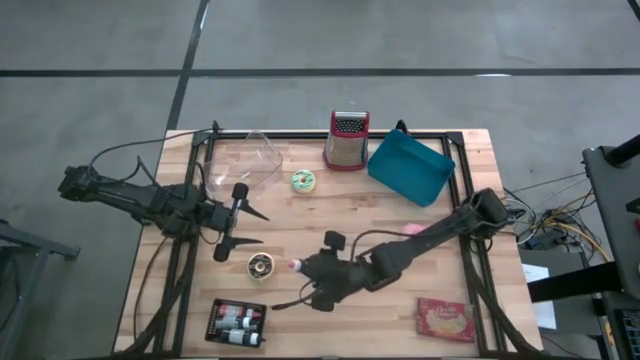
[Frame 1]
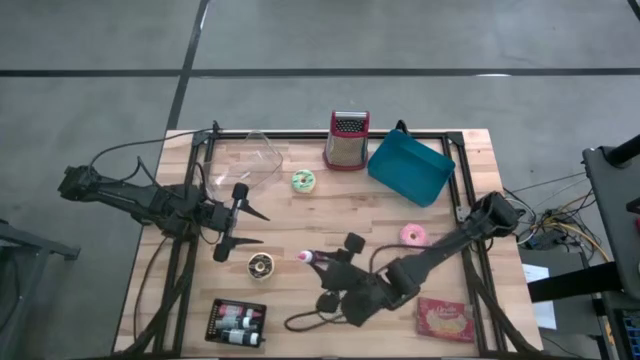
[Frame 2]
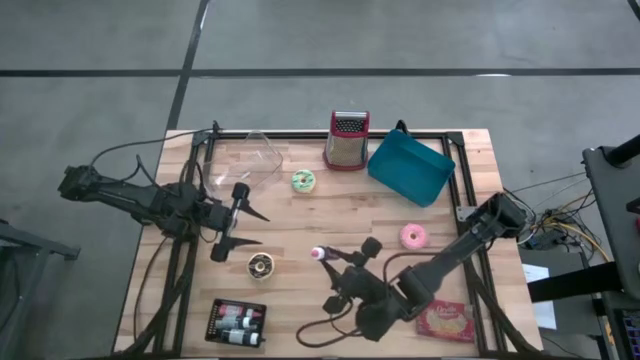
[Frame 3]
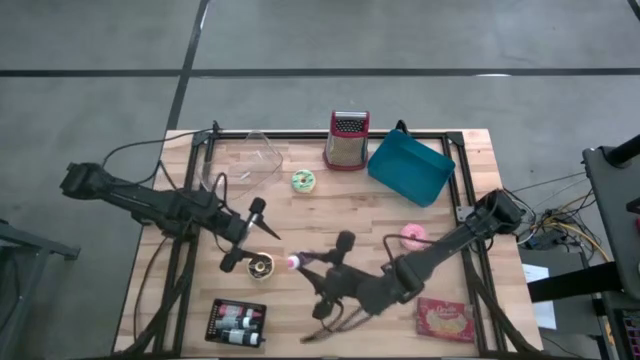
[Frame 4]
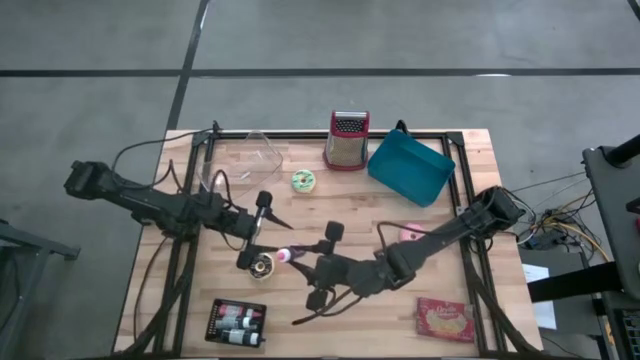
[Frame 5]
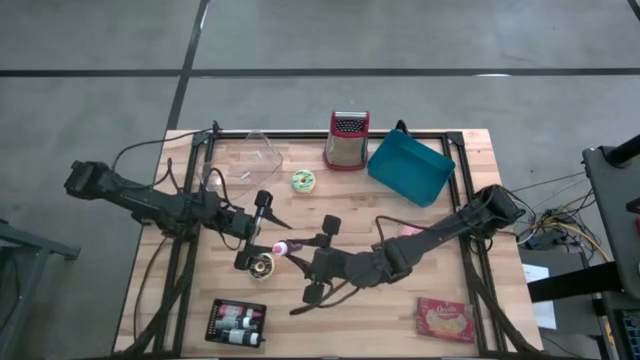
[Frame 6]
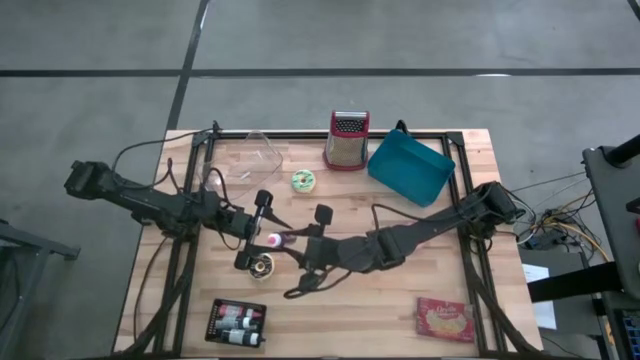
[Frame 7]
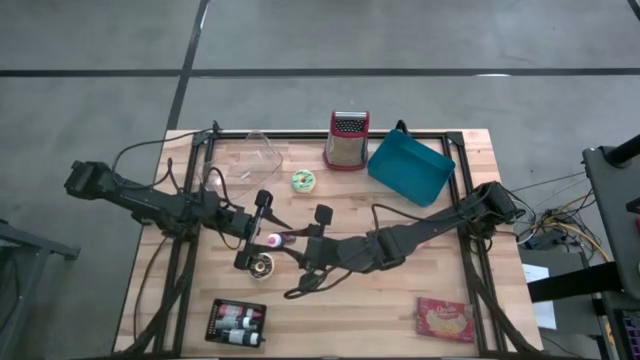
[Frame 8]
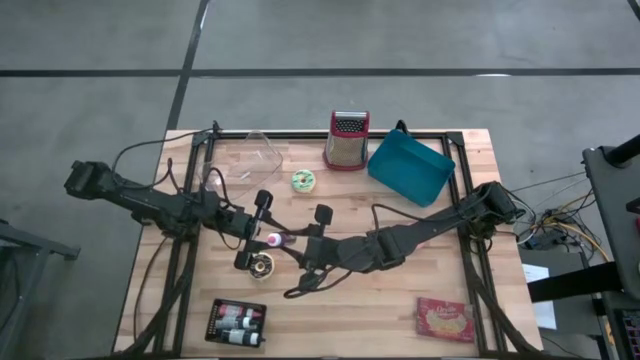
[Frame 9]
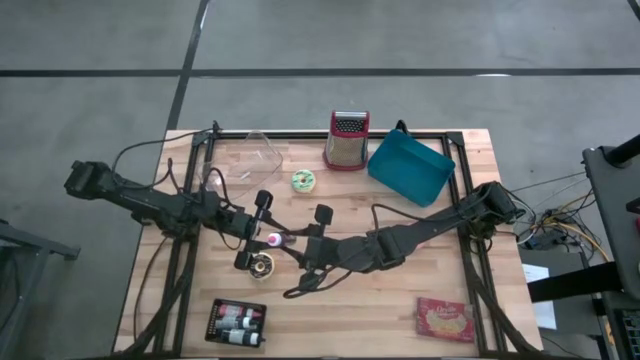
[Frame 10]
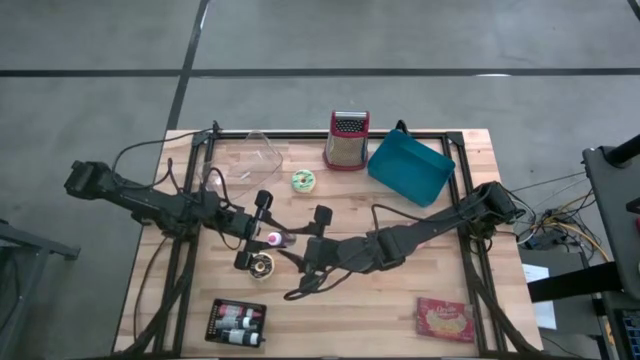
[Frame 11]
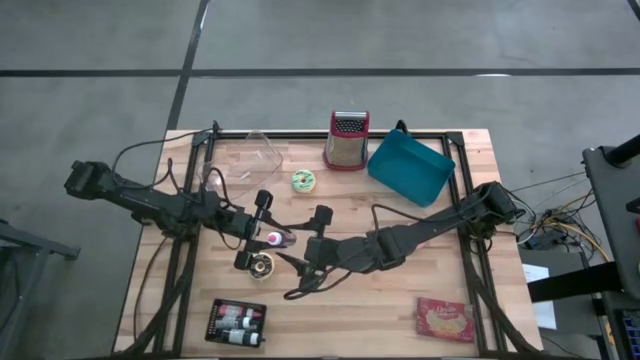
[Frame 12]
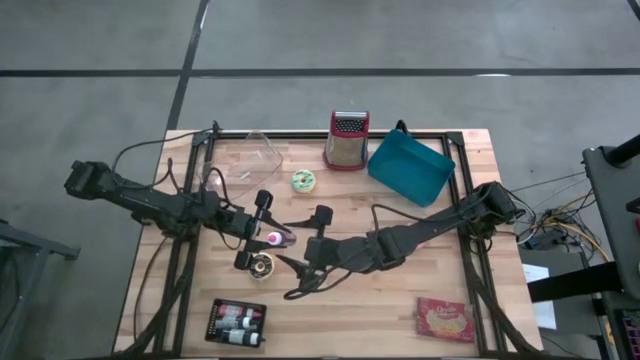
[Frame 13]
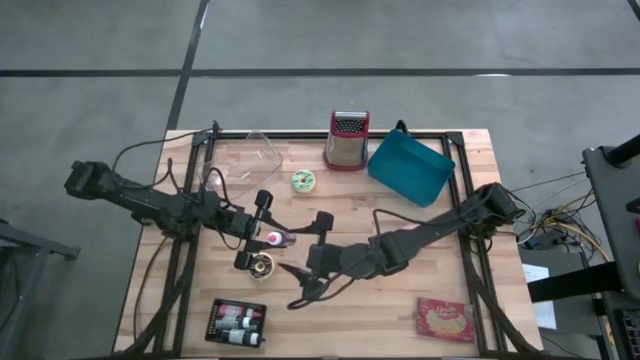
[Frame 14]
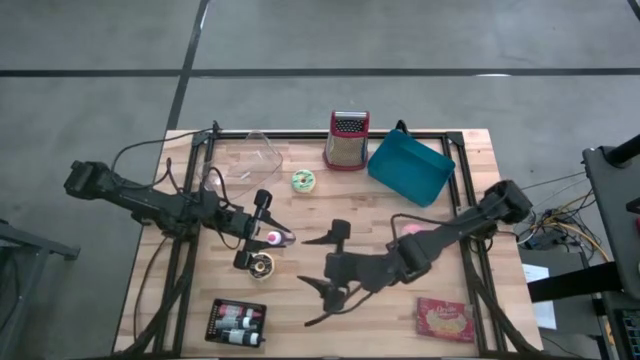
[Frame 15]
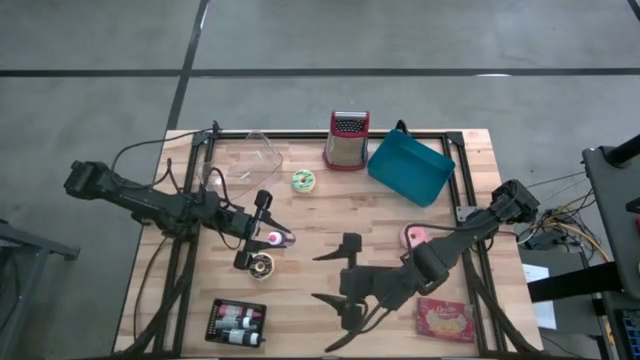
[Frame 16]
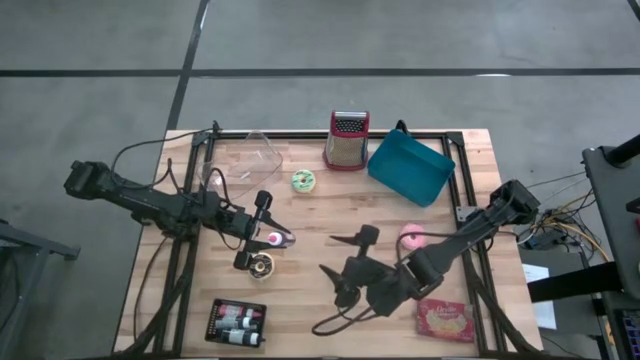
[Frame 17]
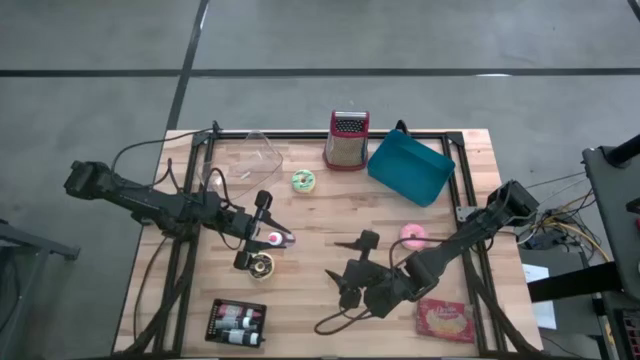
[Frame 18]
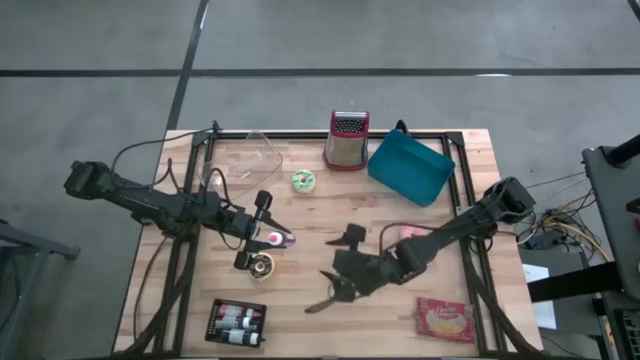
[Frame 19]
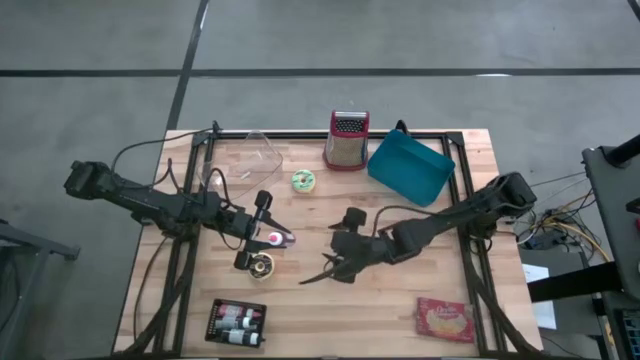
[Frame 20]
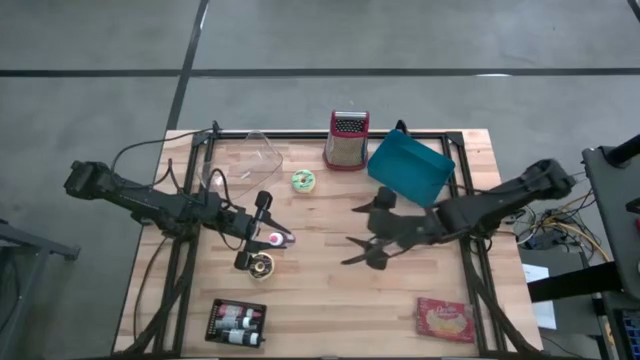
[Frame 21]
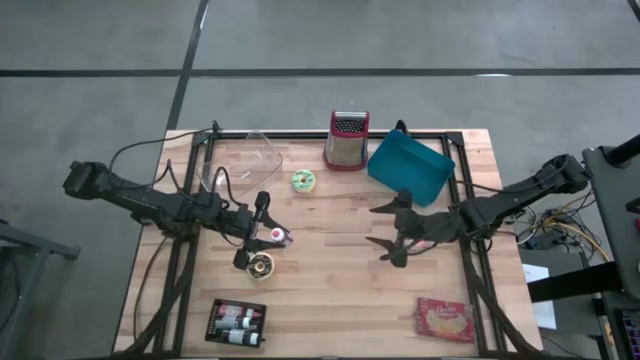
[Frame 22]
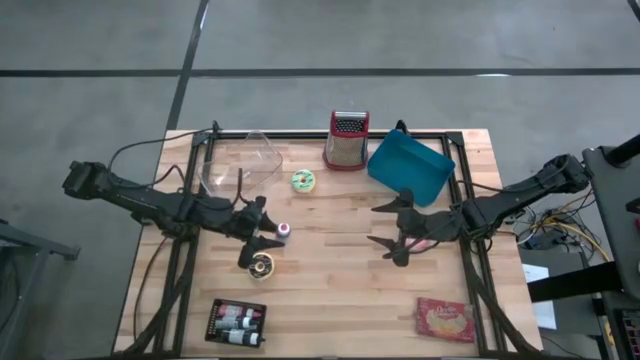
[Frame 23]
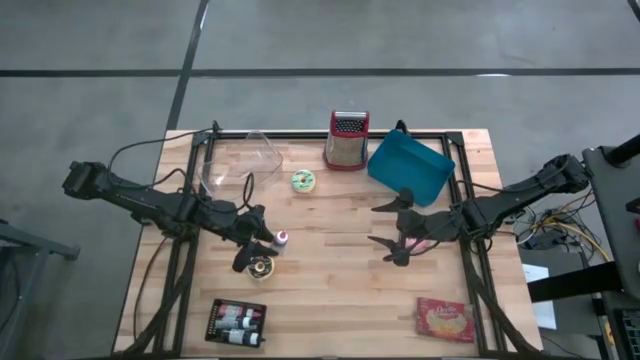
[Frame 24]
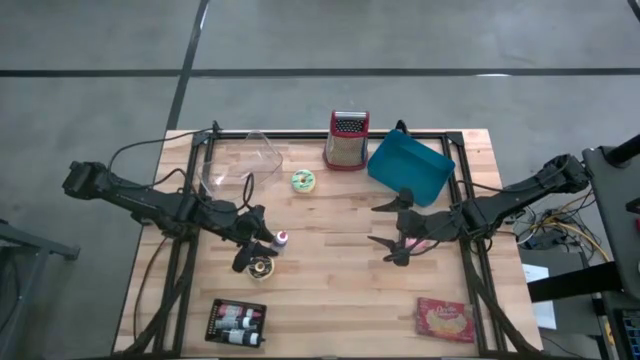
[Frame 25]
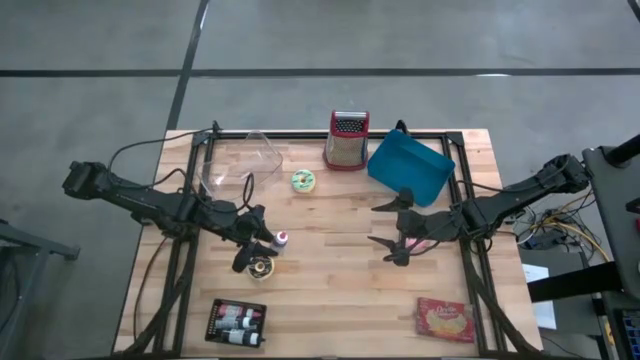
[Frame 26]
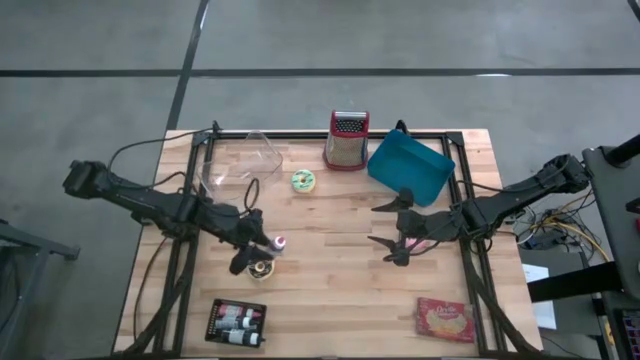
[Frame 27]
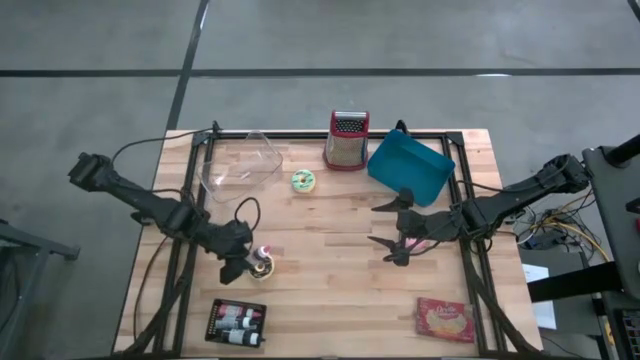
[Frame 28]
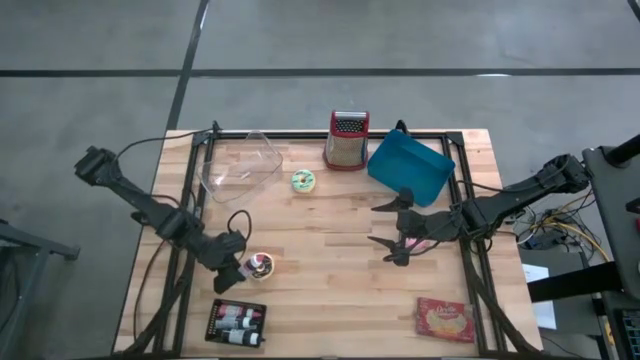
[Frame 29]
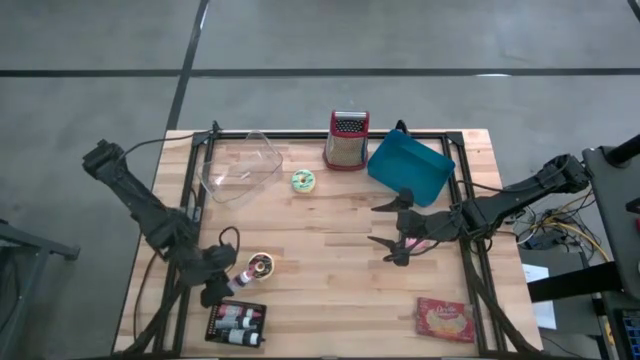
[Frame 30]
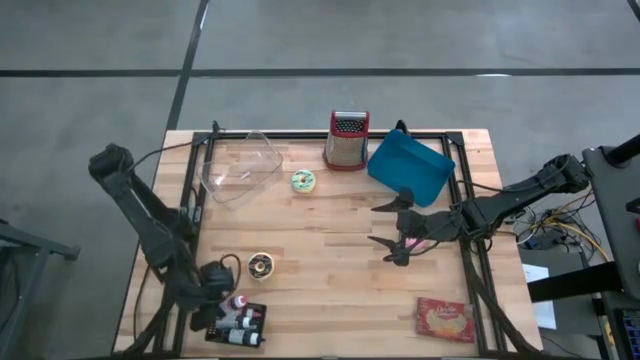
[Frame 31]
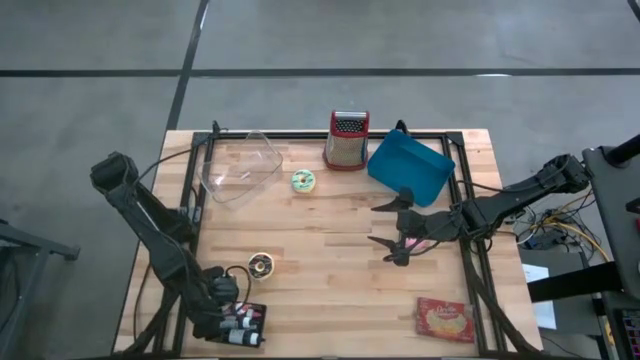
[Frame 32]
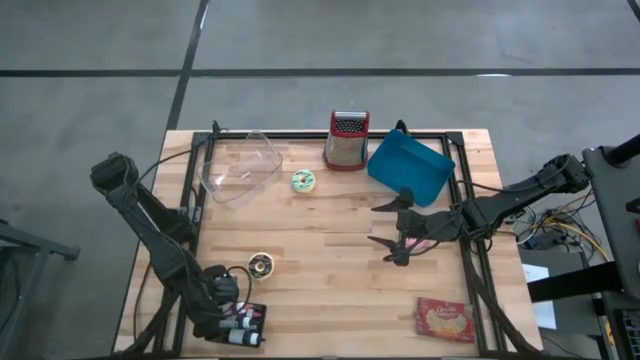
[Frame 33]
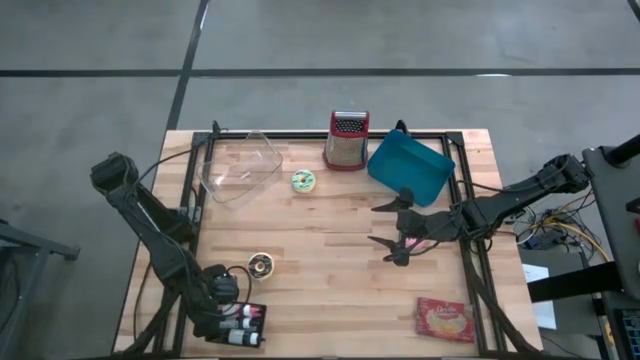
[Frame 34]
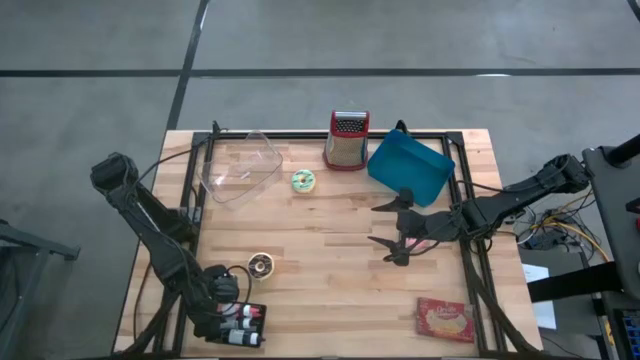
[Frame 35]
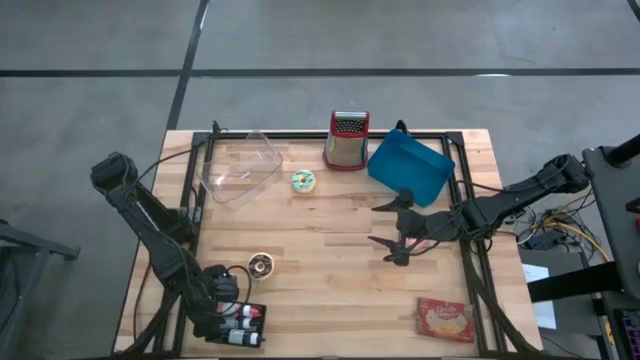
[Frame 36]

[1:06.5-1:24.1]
Task: Pick & Place Food Item
Put the pink food coloring bottle into the black bin

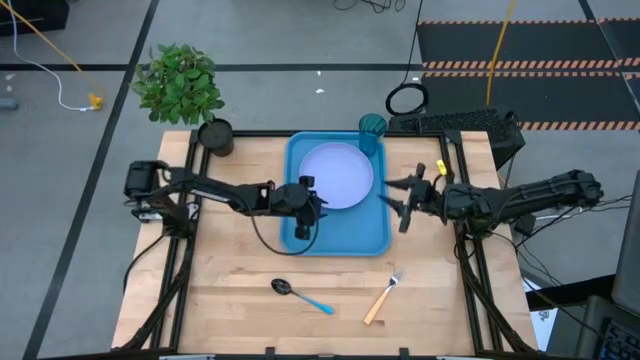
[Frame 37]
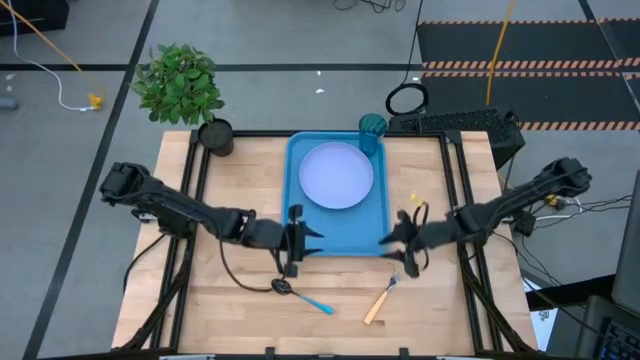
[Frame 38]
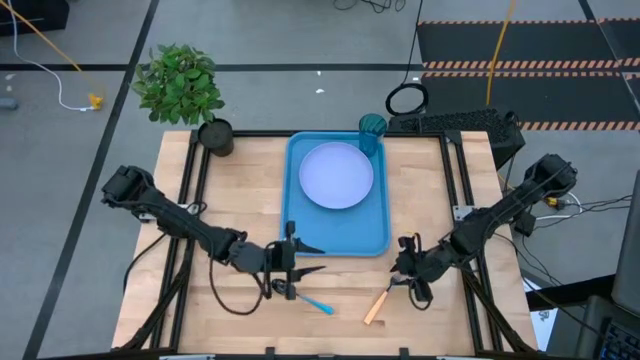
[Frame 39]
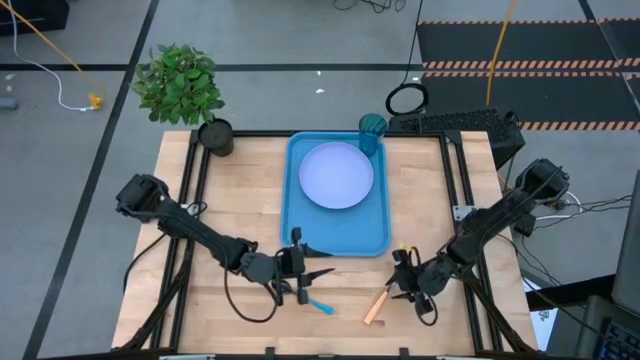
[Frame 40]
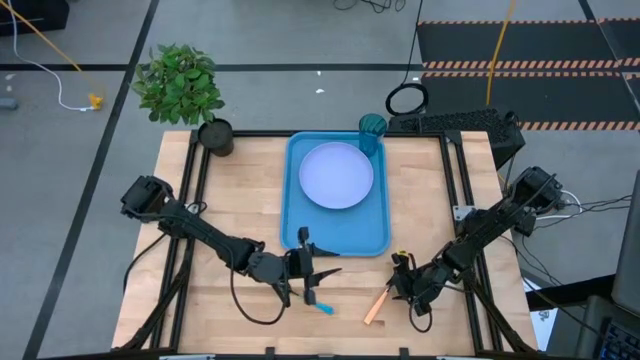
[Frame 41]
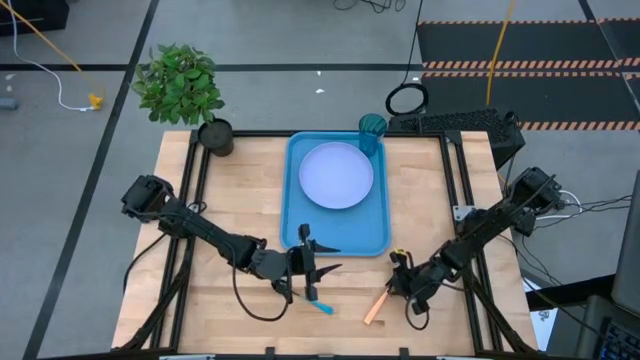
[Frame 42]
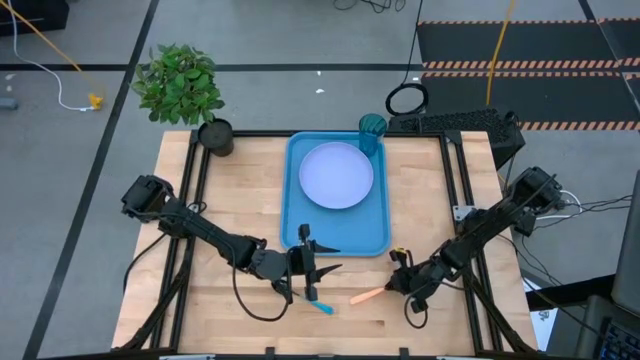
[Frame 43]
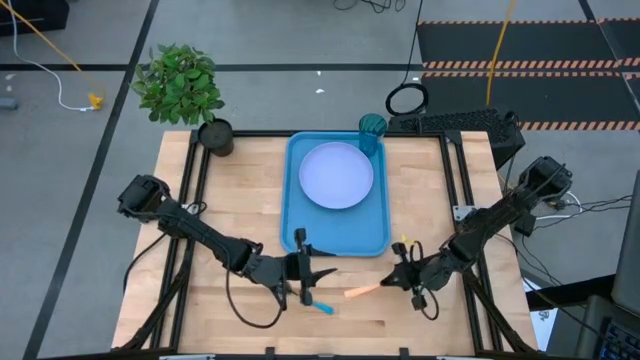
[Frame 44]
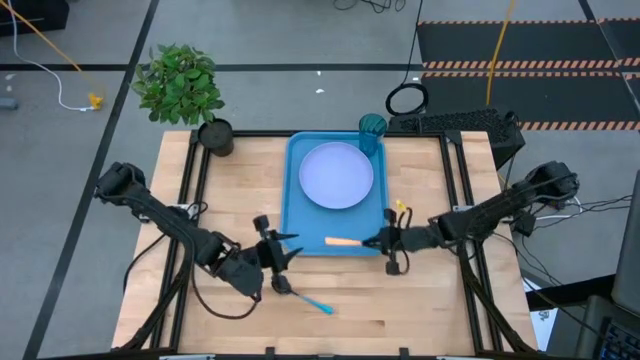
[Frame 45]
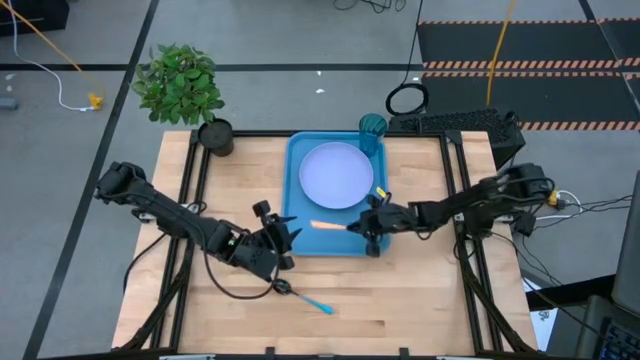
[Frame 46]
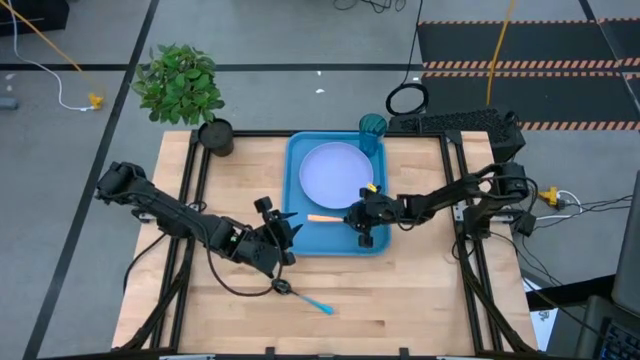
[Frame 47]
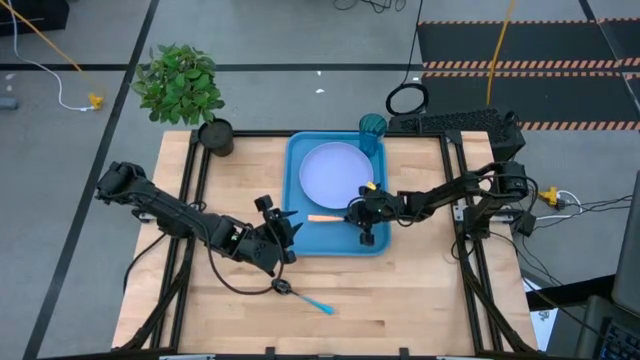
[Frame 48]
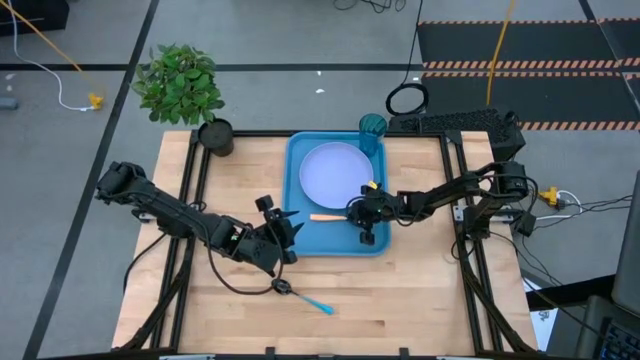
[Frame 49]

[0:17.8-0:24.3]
Task: Pick and place plate/cup/fork/spoon on tray
Put the orange fork on the blue serving tray to the right of the purple plate
